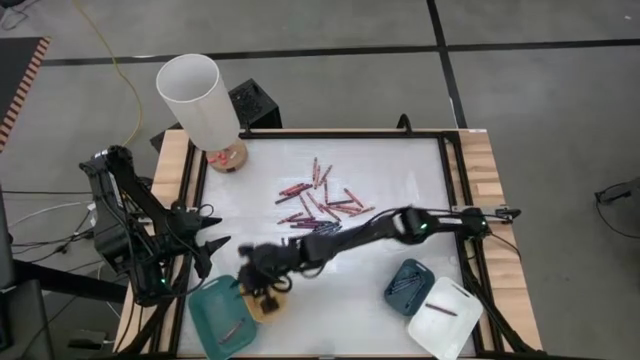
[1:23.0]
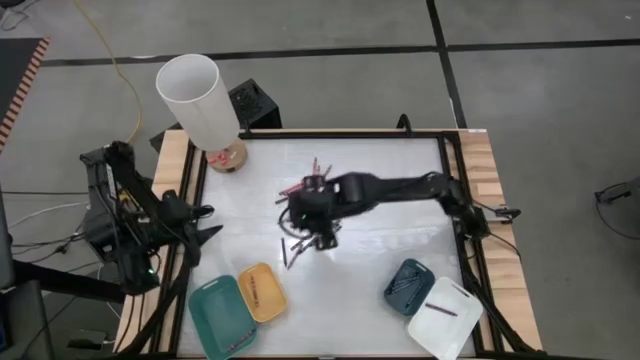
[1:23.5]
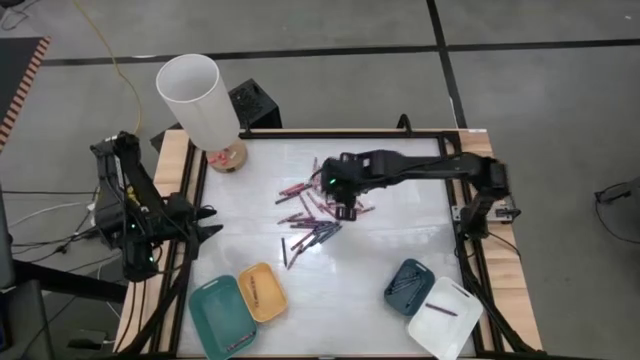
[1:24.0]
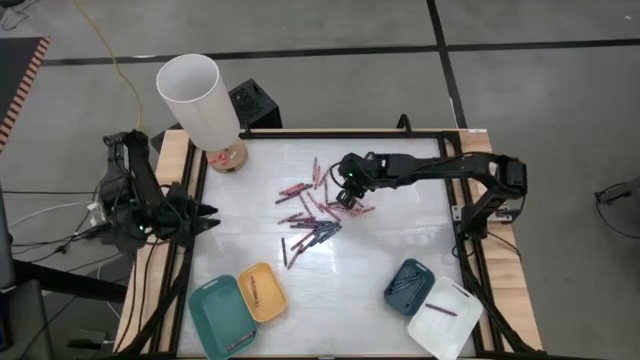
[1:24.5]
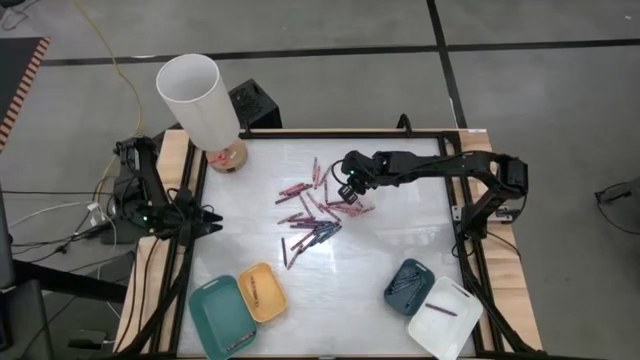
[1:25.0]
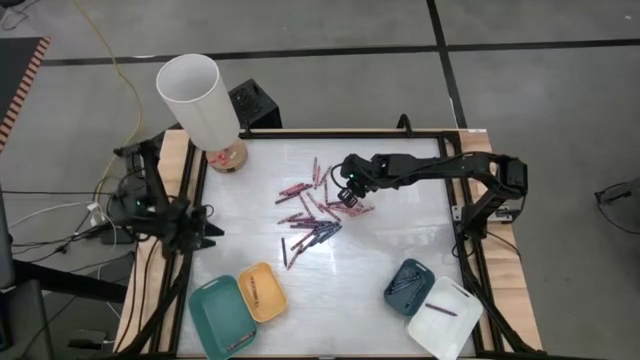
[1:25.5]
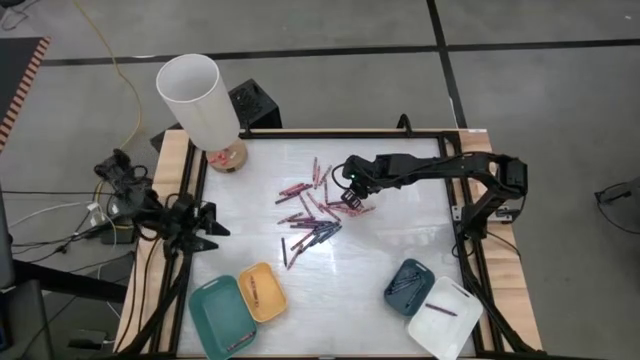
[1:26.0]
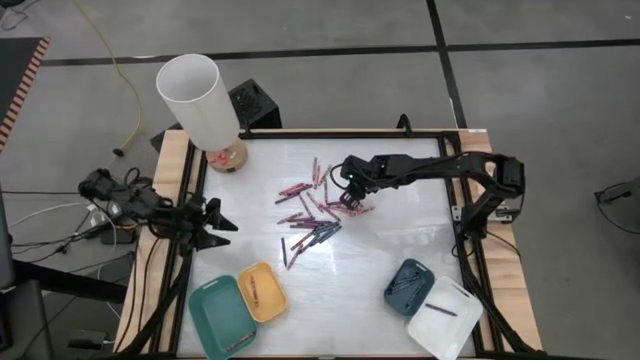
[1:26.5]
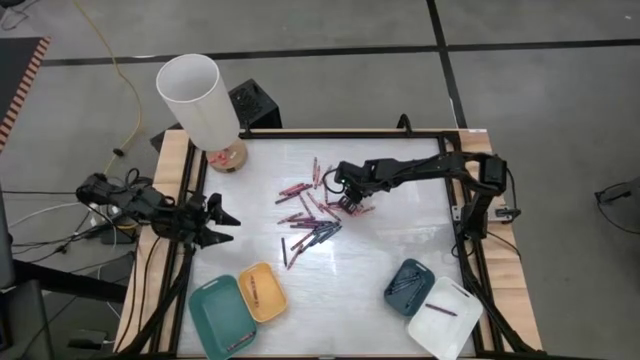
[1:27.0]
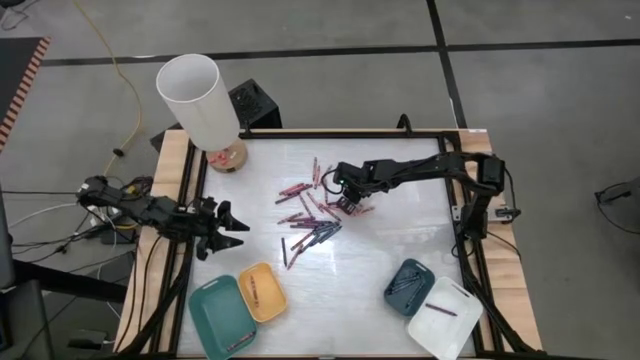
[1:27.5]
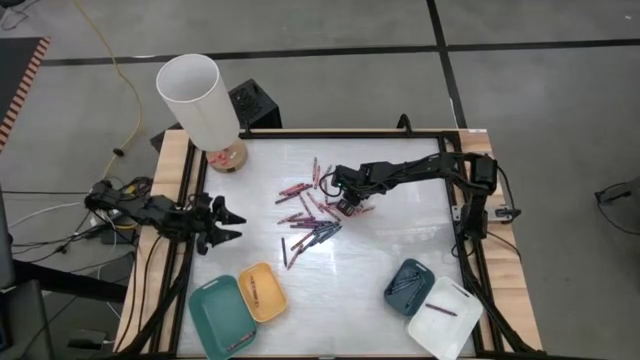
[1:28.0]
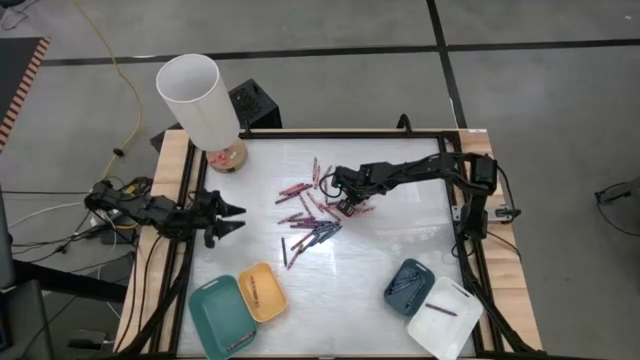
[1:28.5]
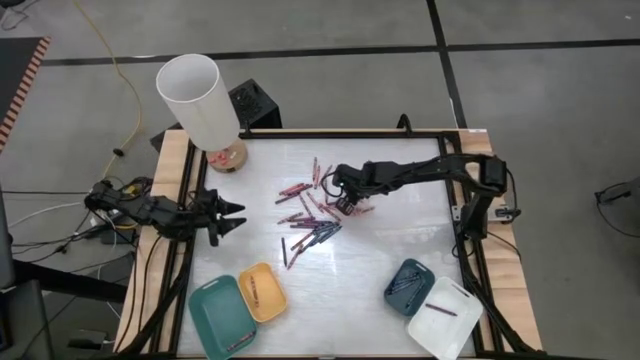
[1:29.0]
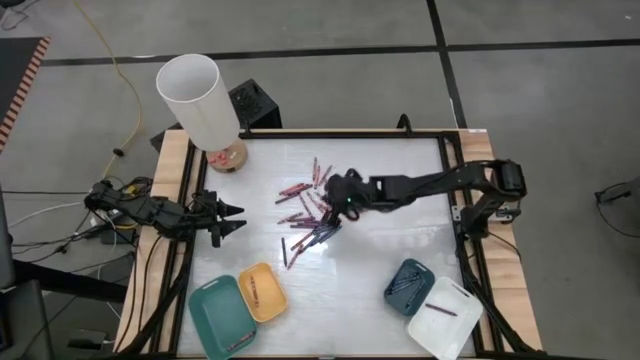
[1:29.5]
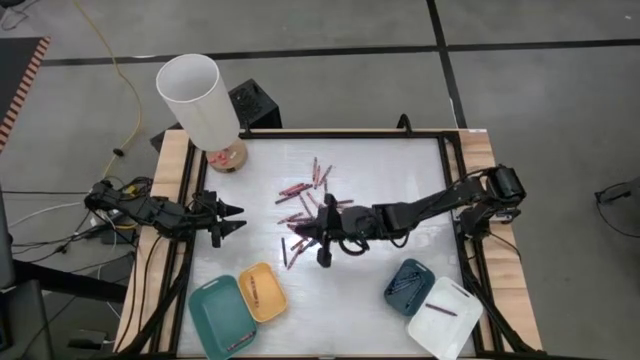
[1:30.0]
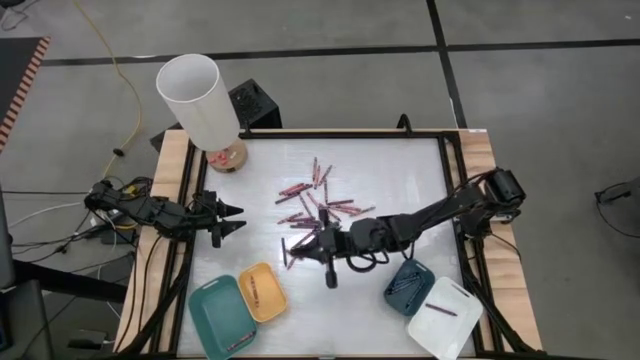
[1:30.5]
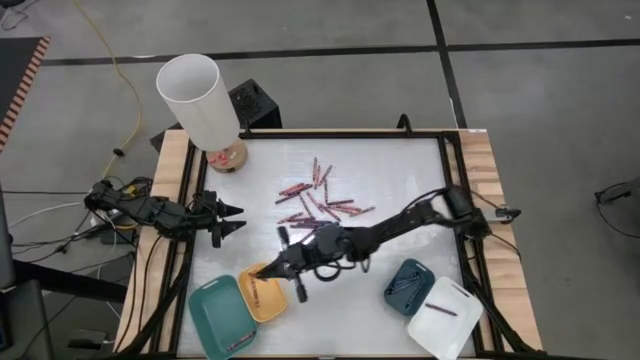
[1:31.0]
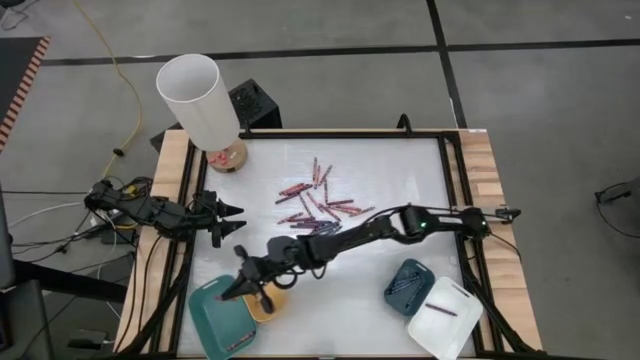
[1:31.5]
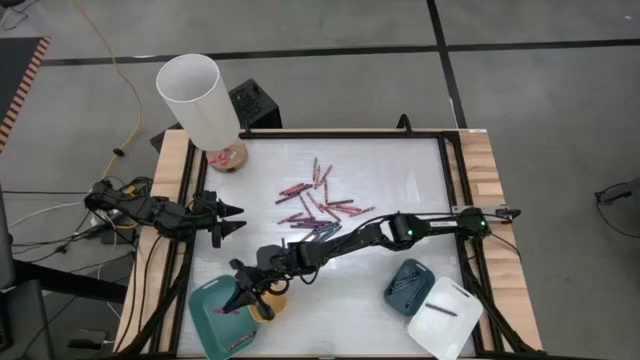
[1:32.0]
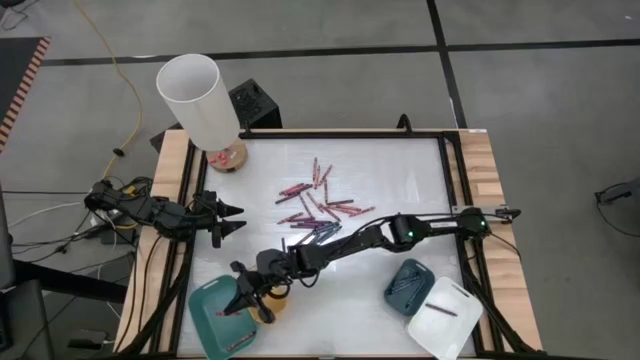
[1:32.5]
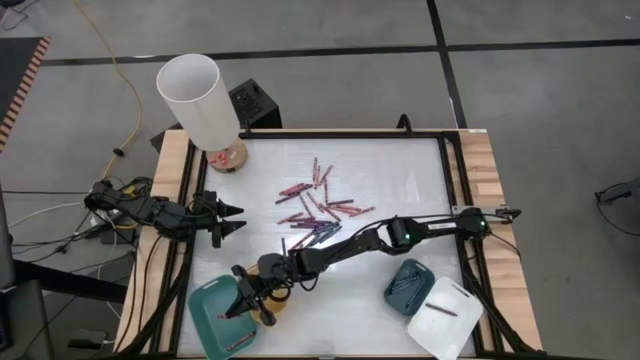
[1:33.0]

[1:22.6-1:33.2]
Task: Sort crayons
Put the red crayon into the blue bin

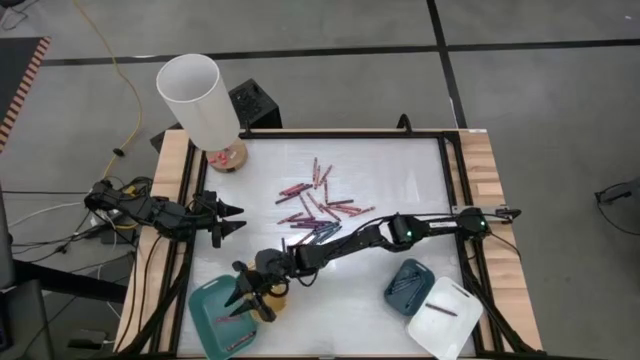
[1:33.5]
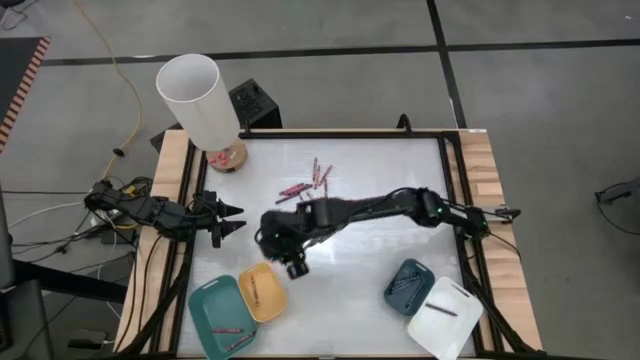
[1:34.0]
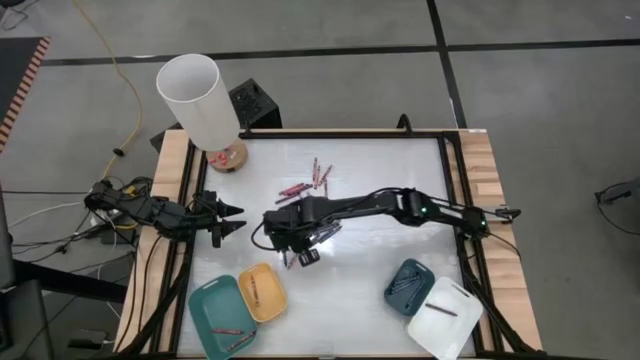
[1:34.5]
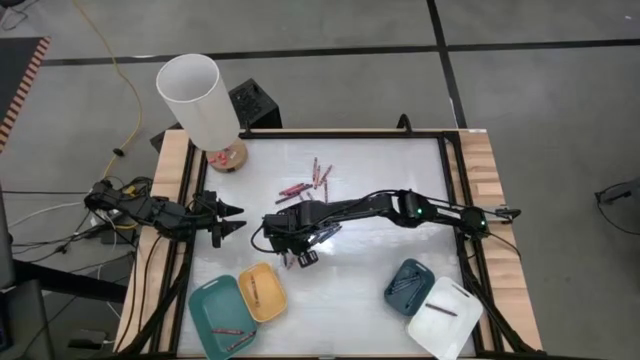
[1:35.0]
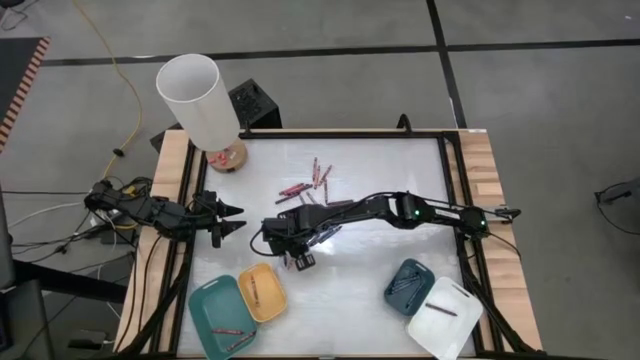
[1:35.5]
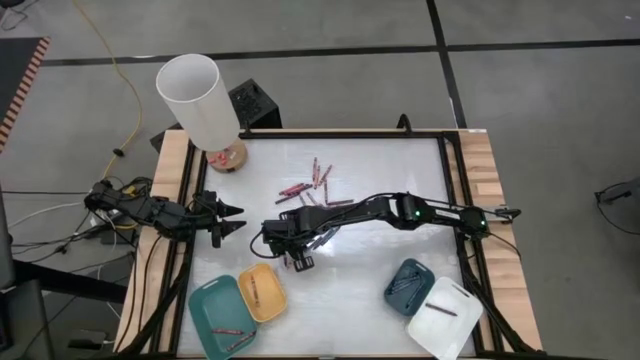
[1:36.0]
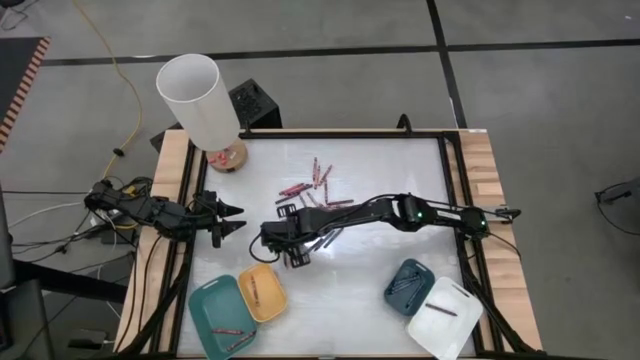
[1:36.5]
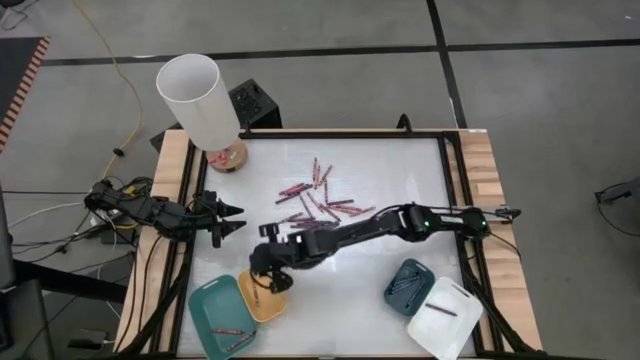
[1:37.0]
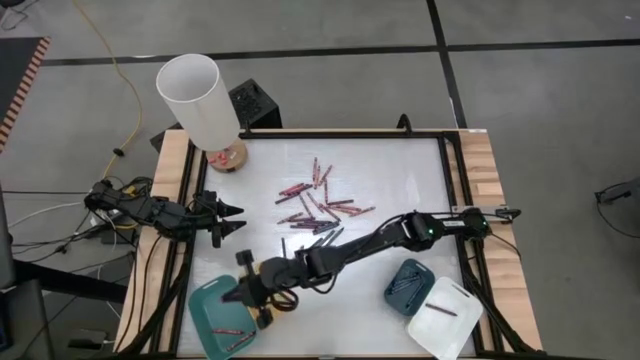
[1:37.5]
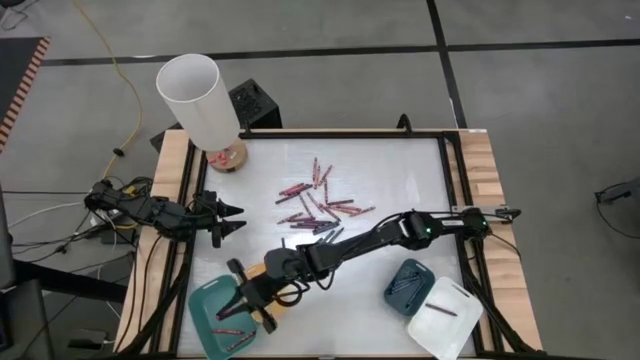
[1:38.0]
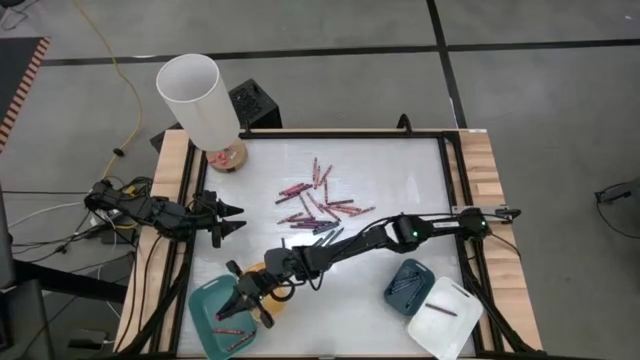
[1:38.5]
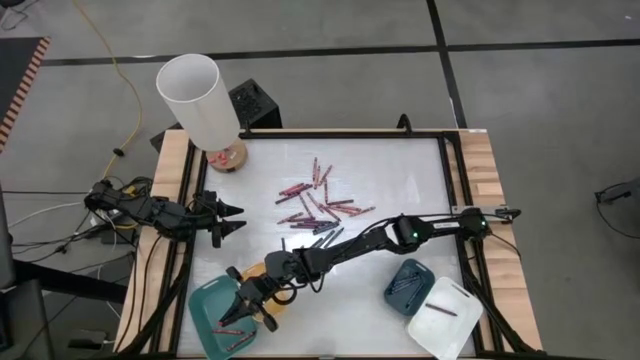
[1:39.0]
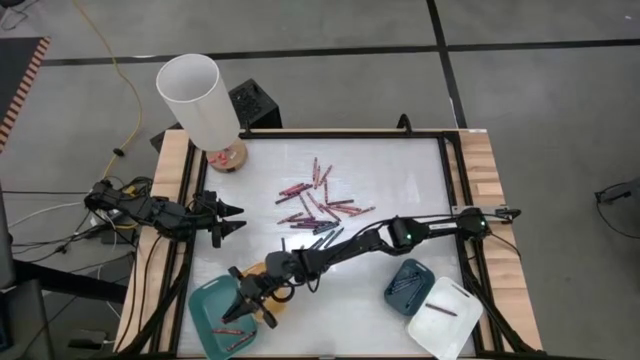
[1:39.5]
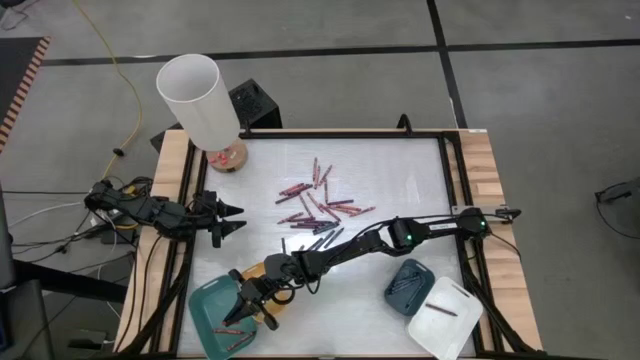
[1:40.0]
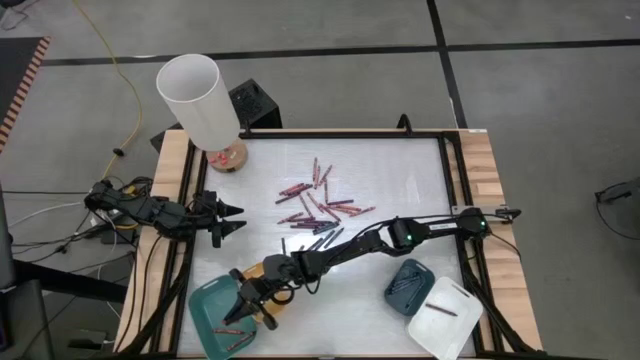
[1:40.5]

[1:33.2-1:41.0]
Put the red crayon into the blue bin

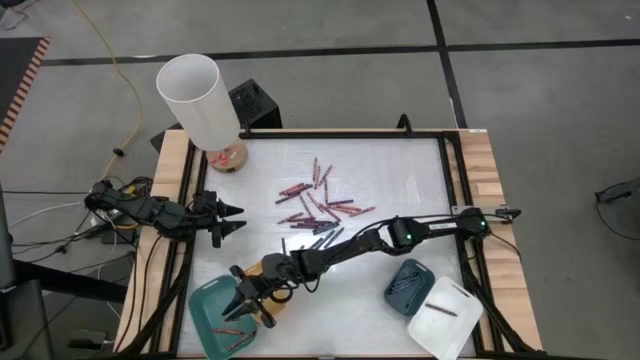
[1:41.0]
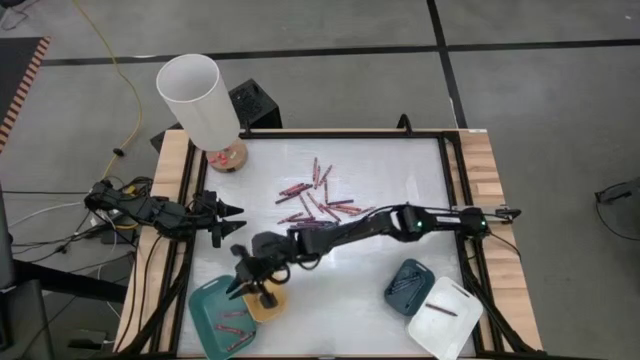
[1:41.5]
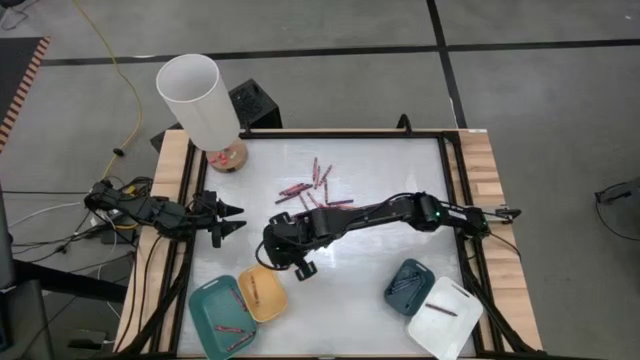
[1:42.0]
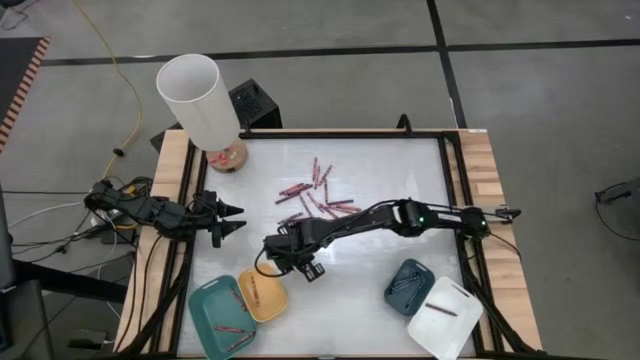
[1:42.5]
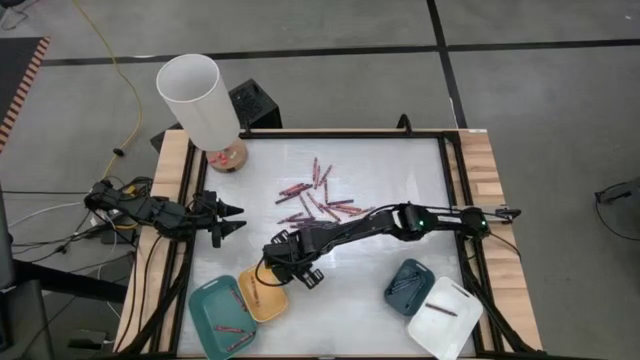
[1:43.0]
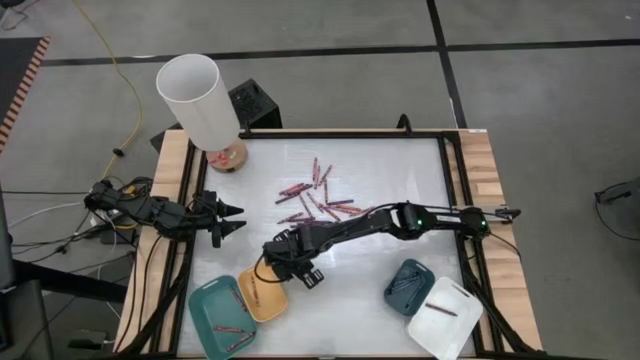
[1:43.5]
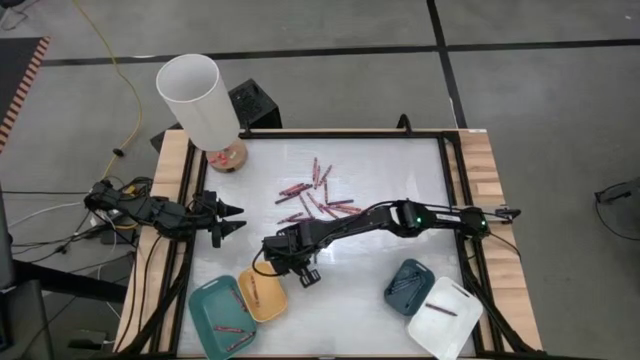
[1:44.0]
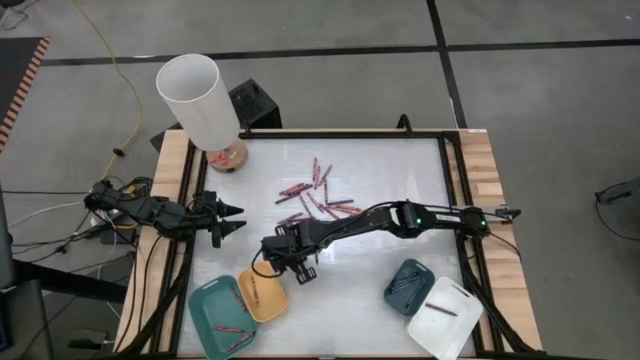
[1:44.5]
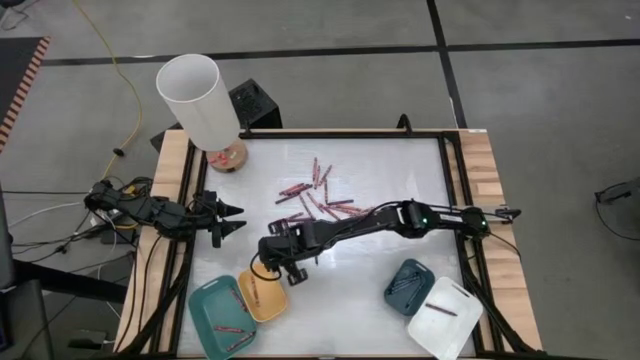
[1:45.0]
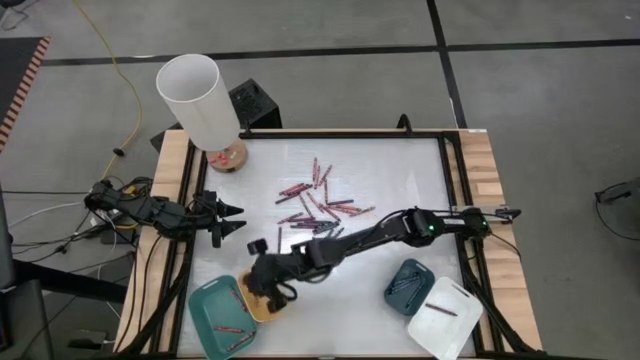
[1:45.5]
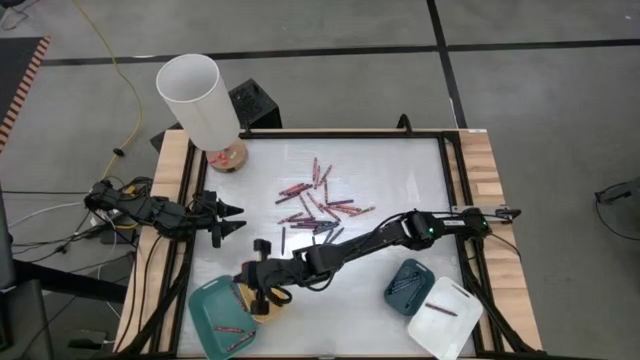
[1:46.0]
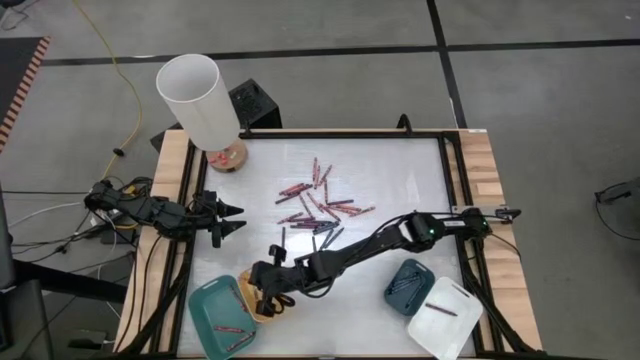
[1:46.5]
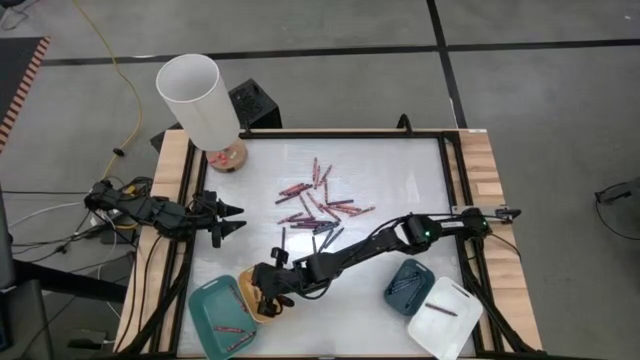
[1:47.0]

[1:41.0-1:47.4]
Put the pink crayon into the yellow bin
